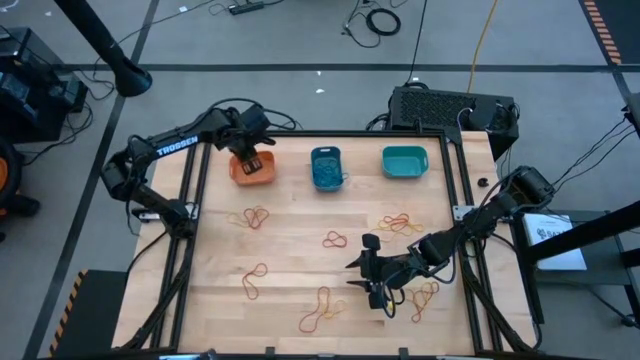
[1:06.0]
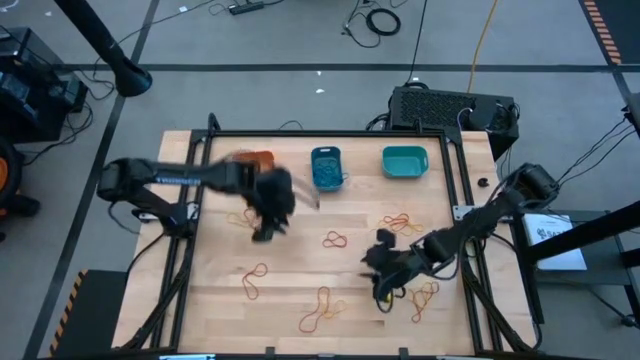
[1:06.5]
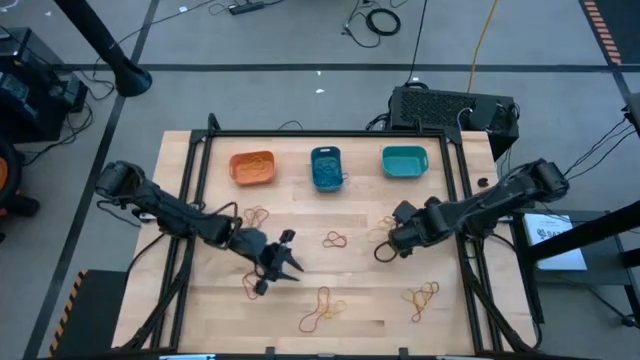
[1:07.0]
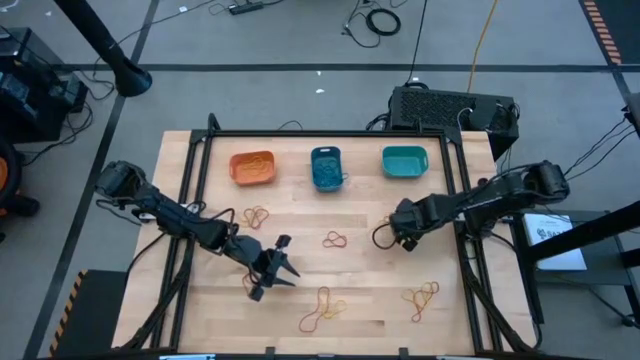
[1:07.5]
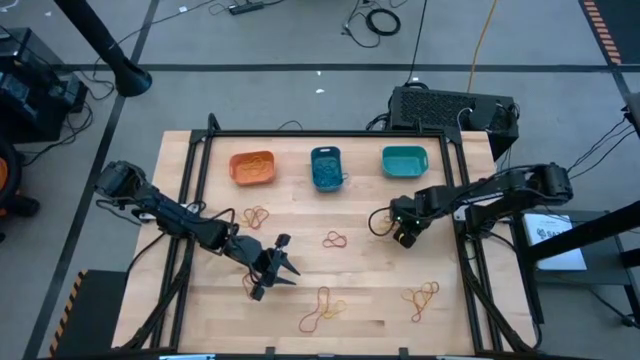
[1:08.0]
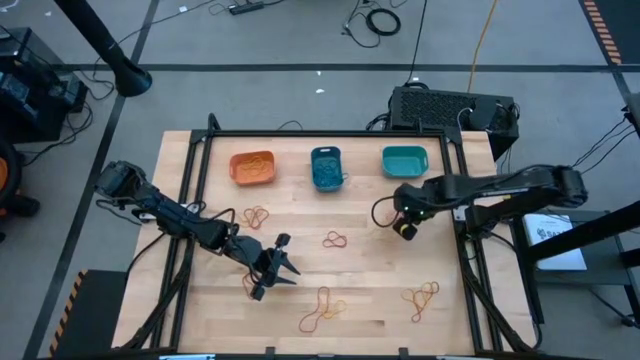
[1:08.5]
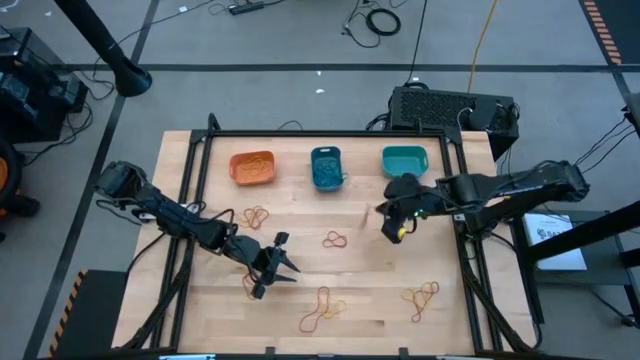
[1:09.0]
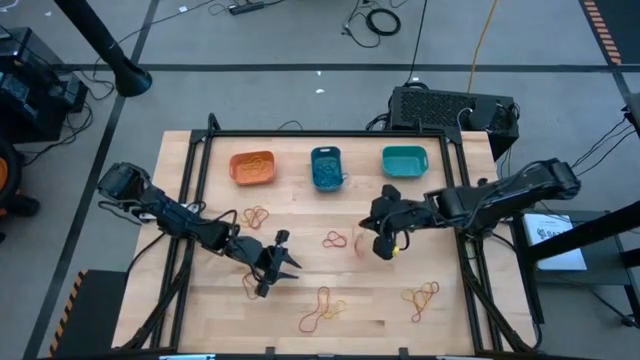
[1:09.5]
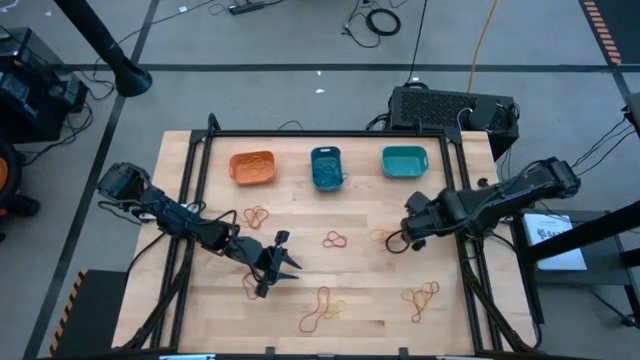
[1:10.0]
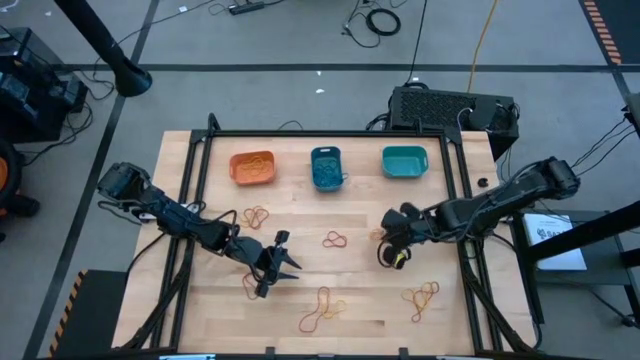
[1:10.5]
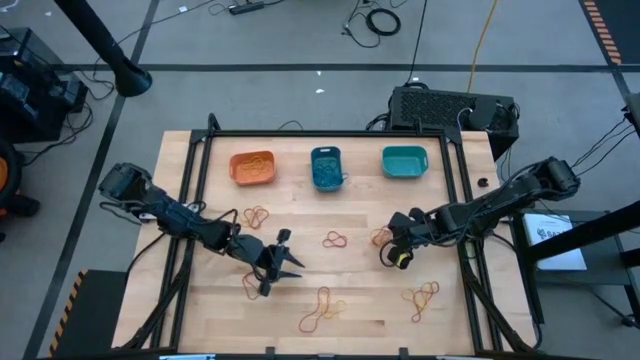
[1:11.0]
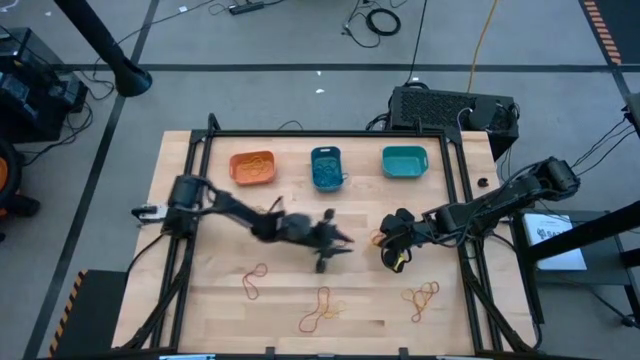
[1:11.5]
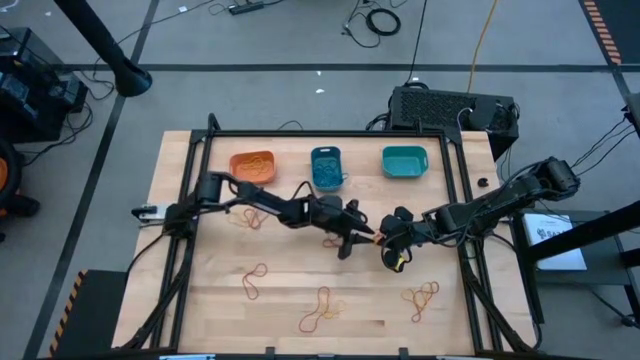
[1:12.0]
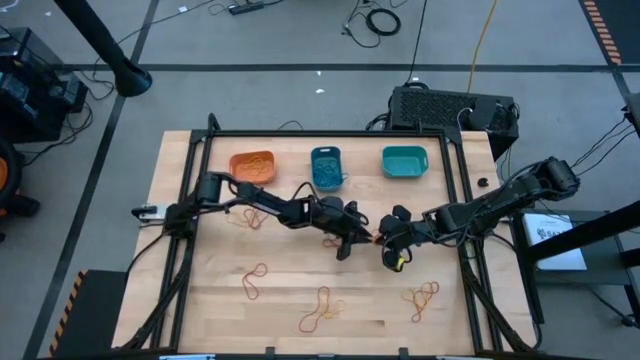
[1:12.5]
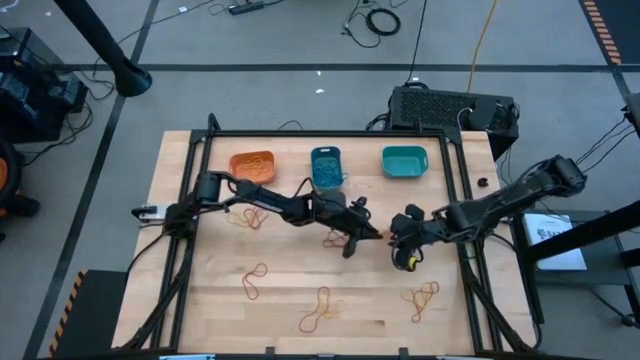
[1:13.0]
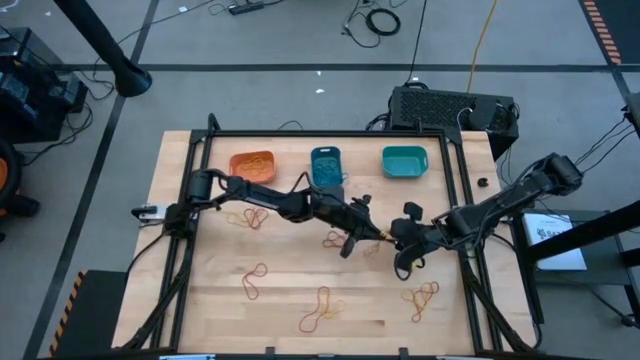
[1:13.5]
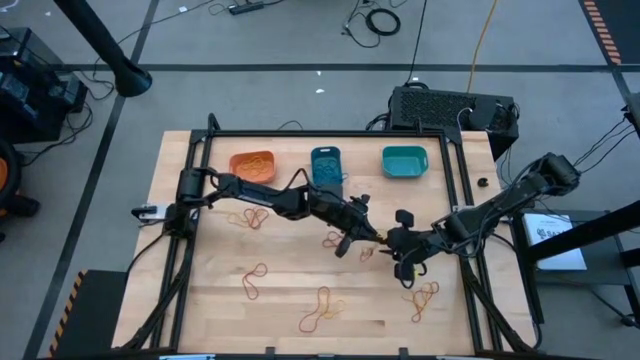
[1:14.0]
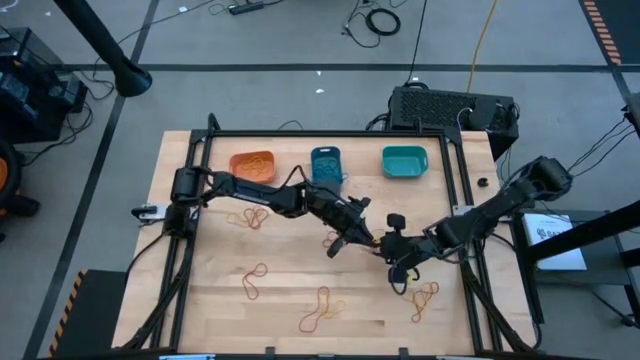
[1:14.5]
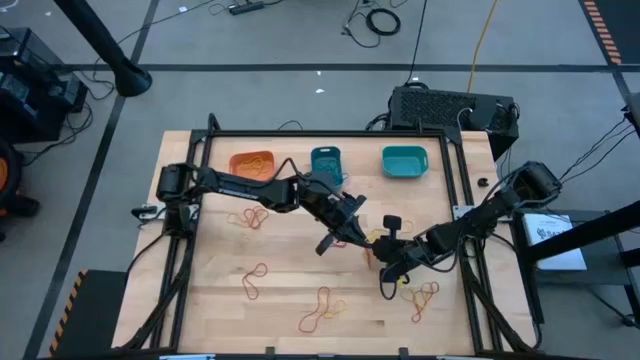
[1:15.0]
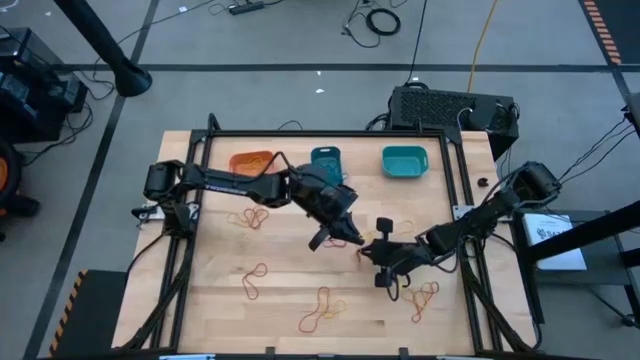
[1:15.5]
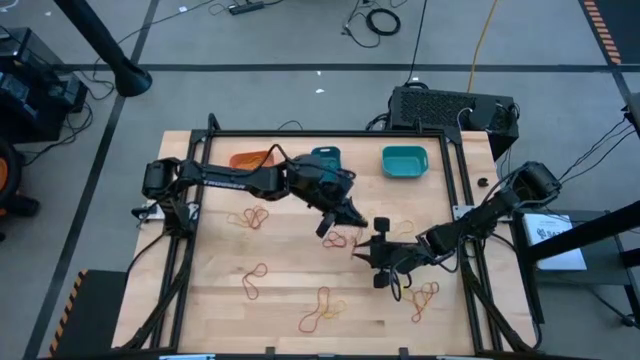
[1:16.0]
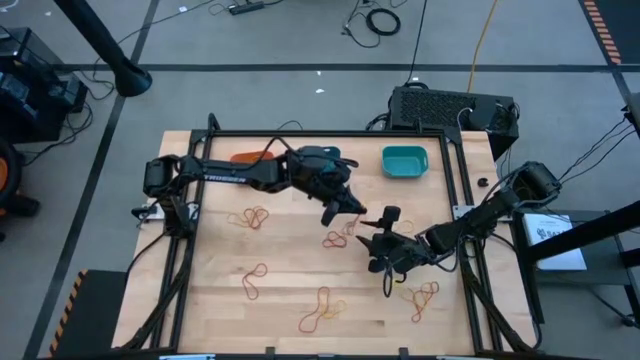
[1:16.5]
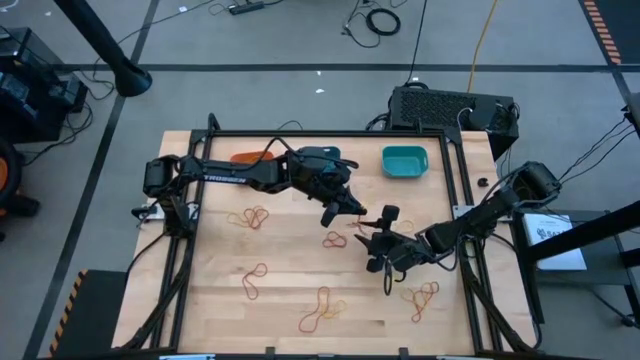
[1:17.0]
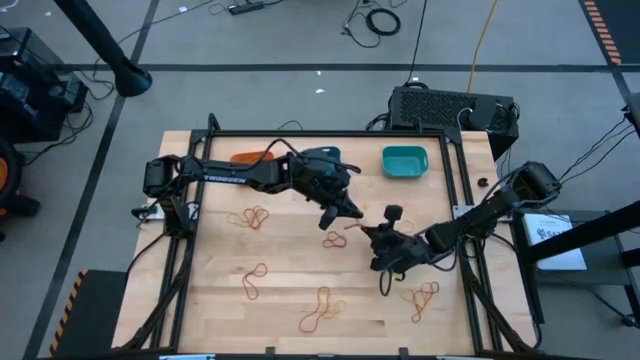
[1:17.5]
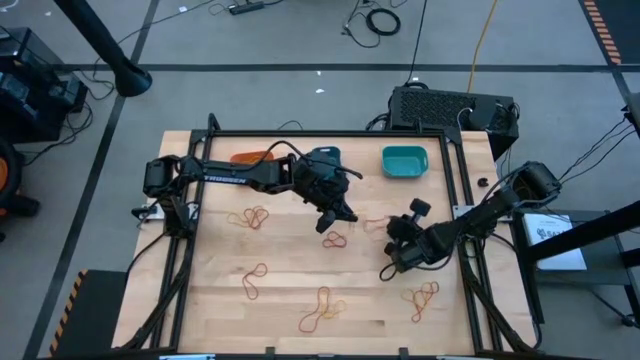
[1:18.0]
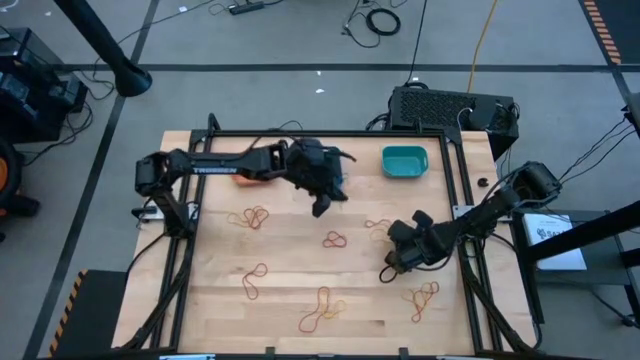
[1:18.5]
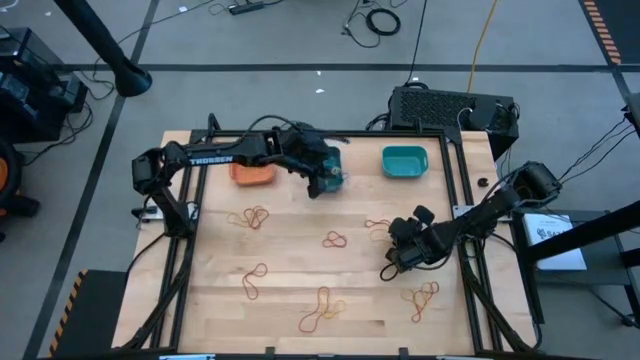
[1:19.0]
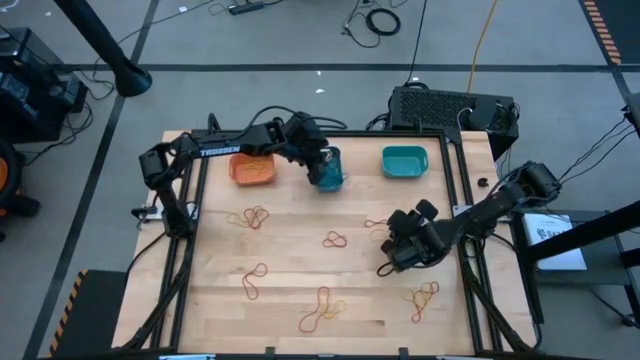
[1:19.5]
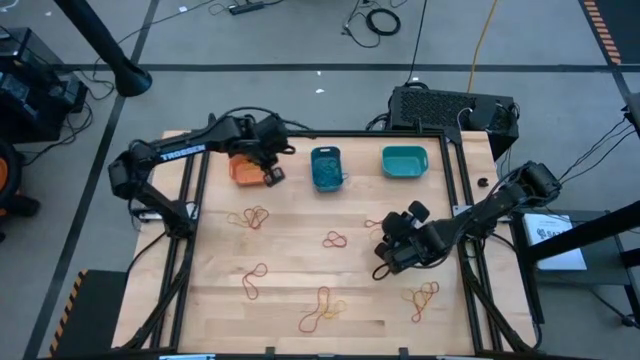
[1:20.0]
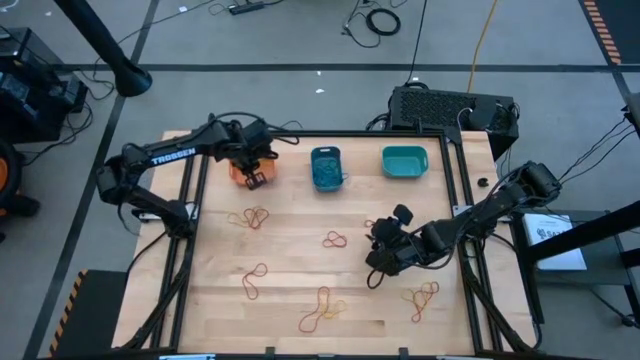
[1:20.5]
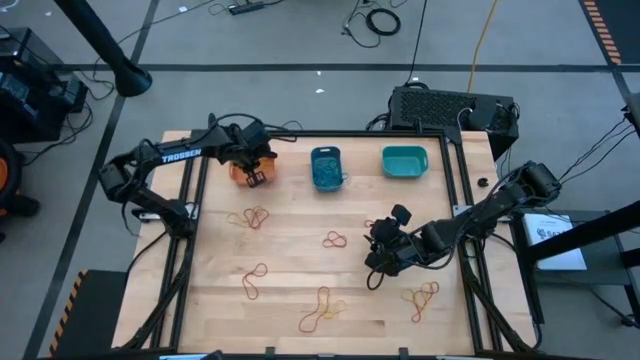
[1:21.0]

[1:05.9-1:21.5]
Task: Sort rubber bands into baskets
Put the yellow rubber band into the orange bin

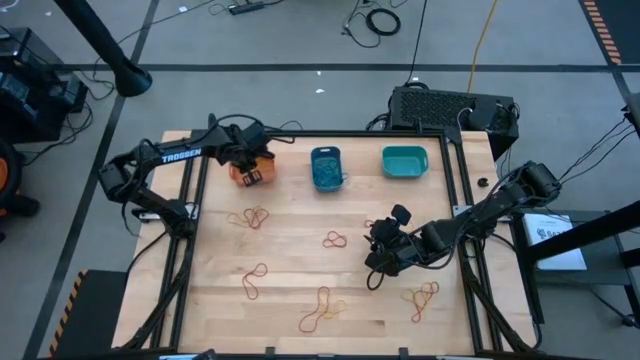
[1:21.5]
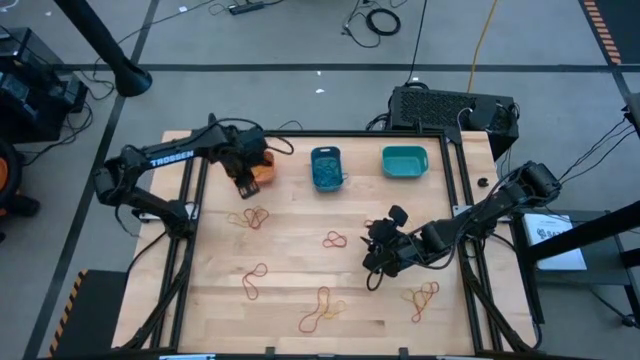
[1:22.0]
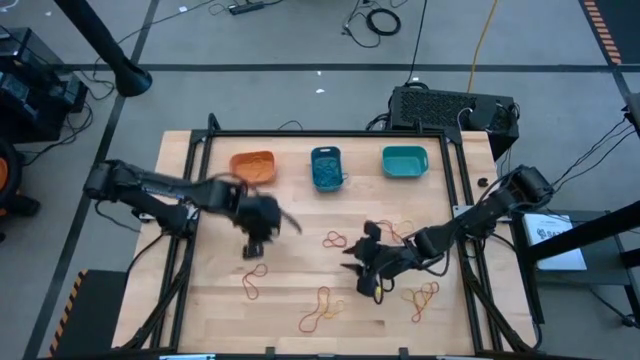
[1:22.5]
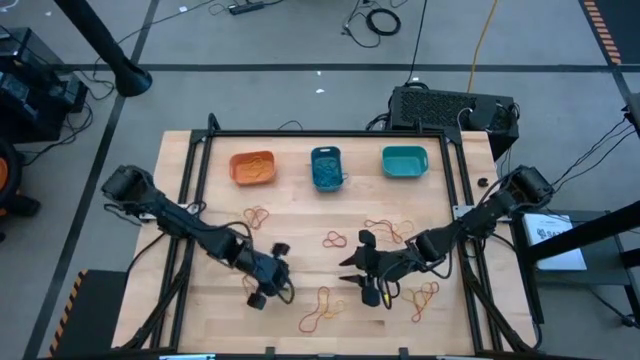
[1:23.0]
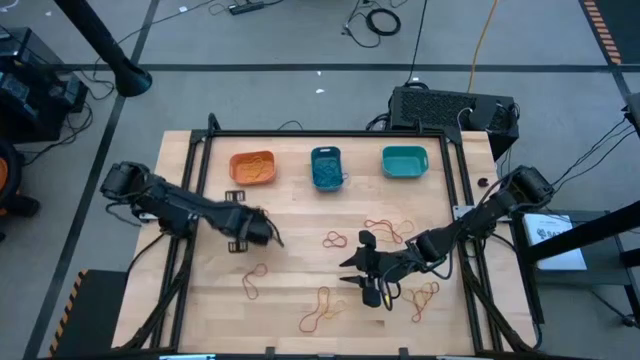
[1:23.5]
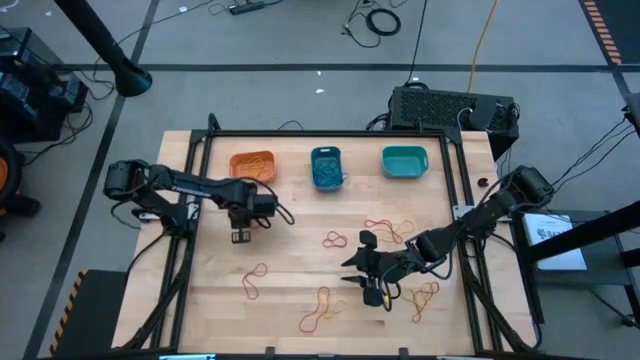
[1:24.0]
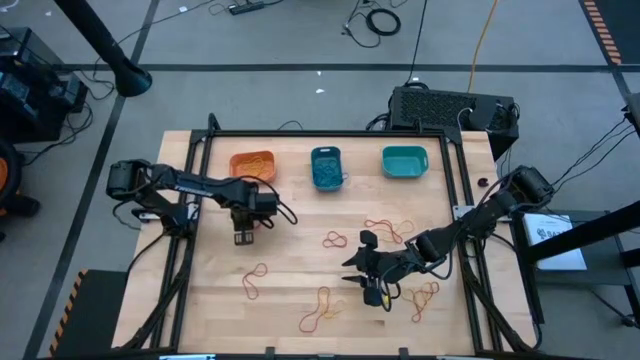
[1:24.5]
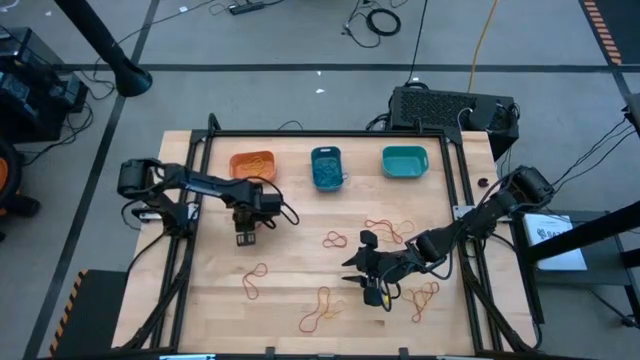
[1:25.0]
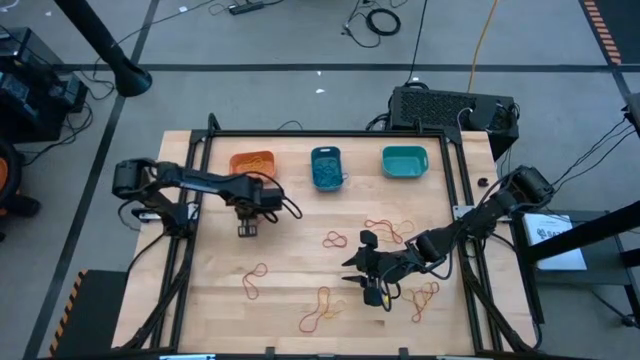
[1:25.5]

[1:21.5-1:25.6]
Put the yellow rubber band into the orange bin
